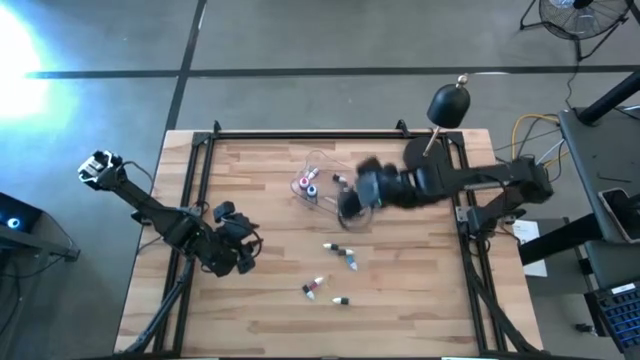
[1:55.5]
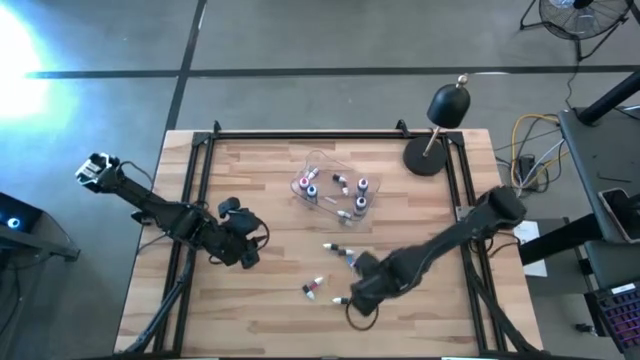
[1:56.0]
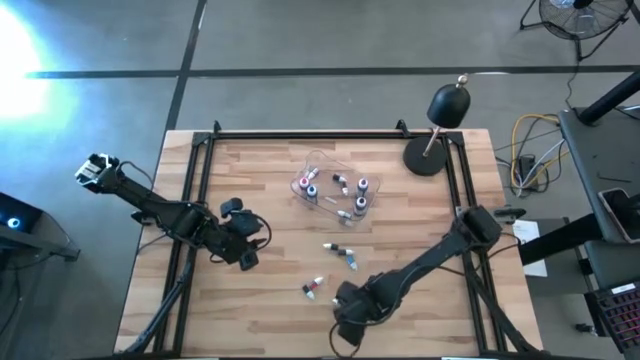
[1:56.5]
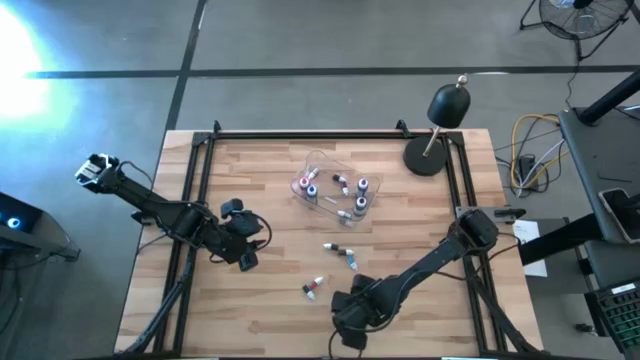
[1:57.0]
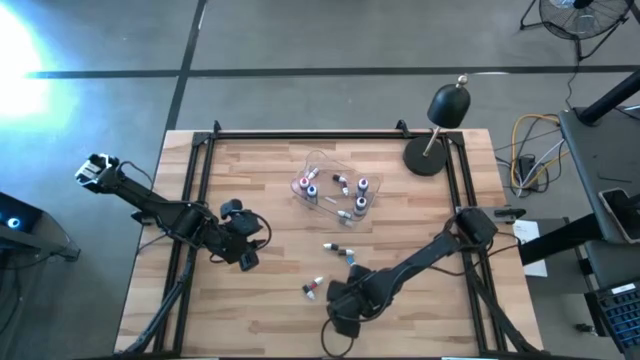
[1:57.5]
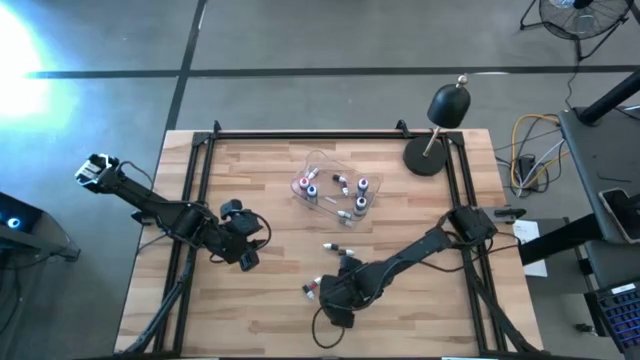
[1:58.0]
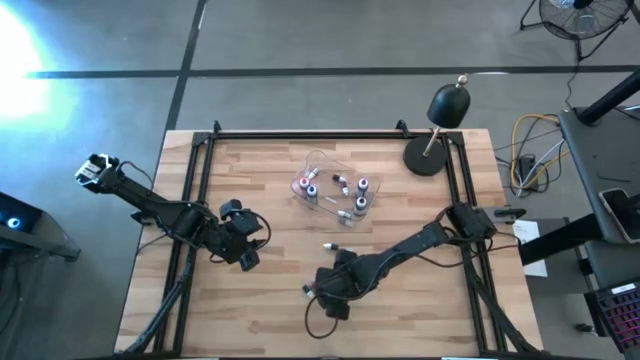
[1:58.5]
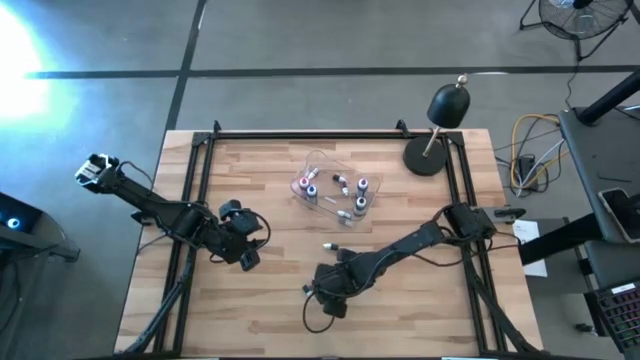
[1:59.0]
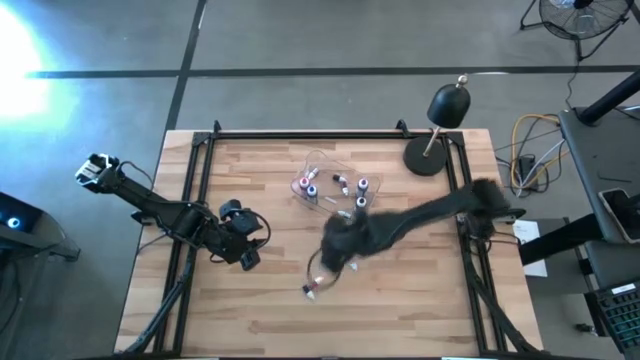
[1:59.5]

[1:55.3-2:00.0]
Task: Pick & Place food coloring
Put the bottom small black food coloring bottle into the transparent bin

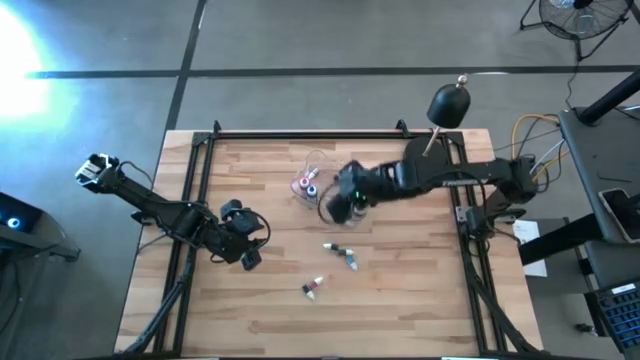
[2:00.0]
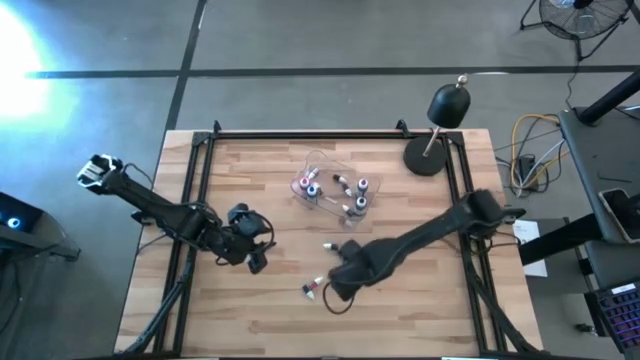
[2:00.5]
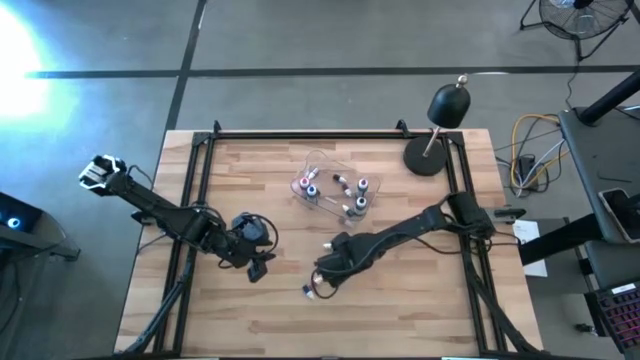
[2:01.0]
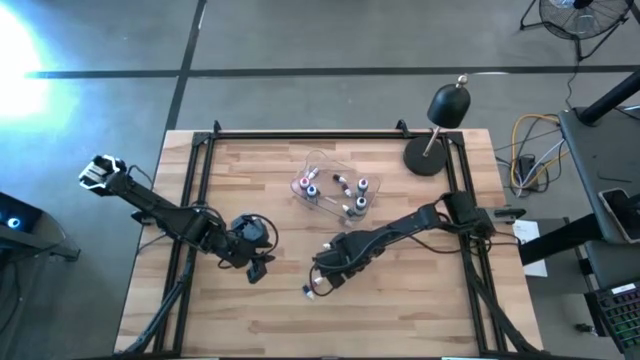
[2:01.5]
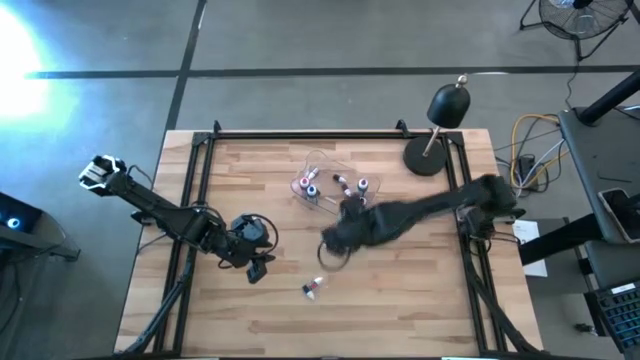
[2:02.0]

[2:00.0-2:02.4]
Put the small blue food coloring bottle into the transparent bin

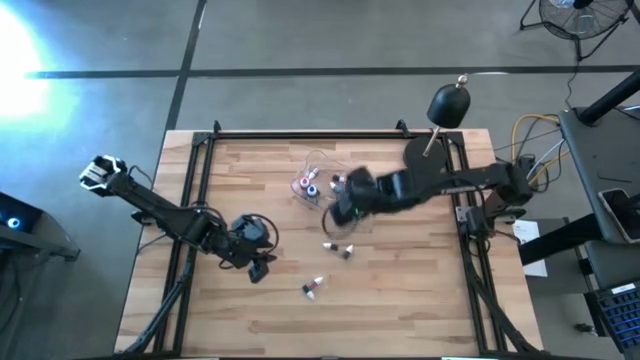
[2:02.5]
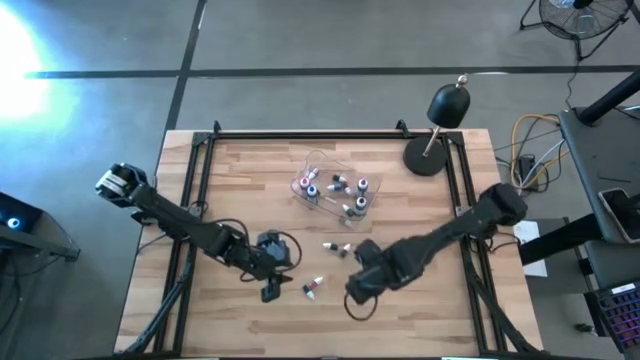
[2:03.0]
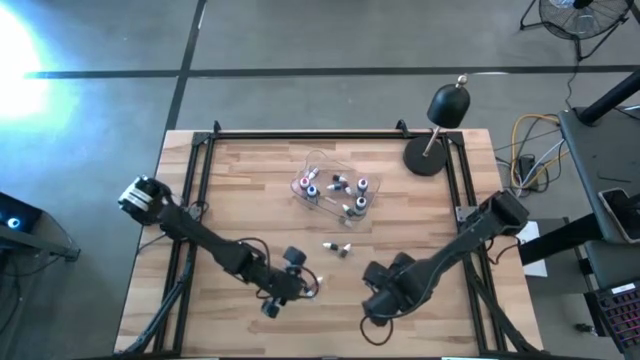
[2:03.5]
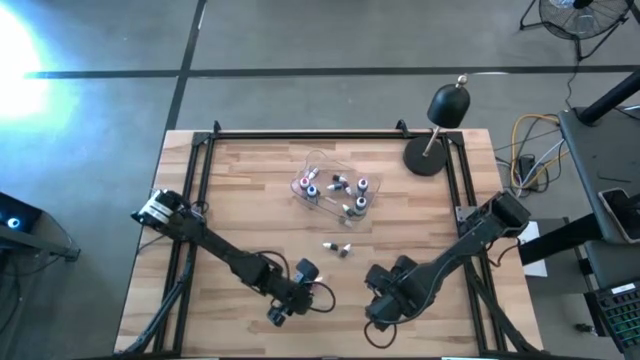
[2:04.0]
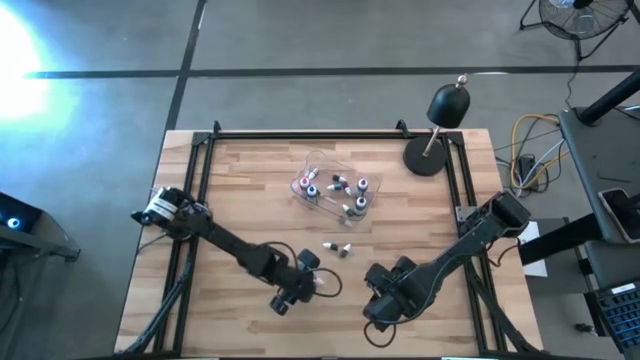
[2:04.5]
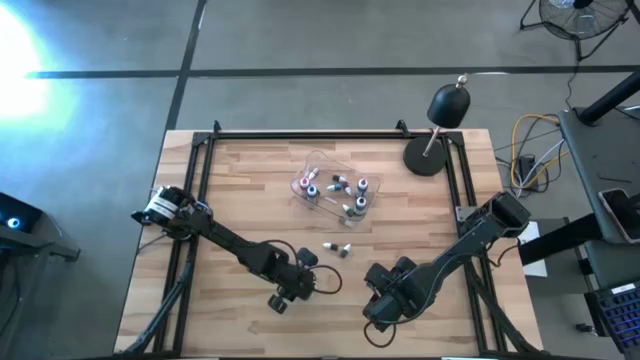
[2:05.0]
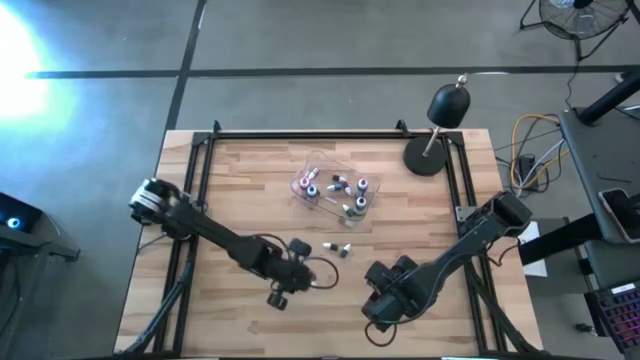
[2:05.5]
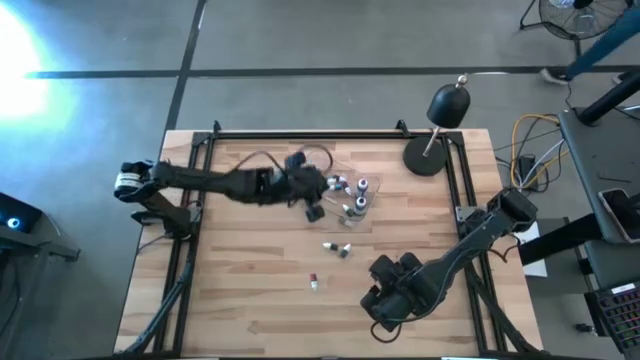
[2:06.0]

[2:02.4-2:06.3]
Put the small purple food coloring bottle into the transparent bin

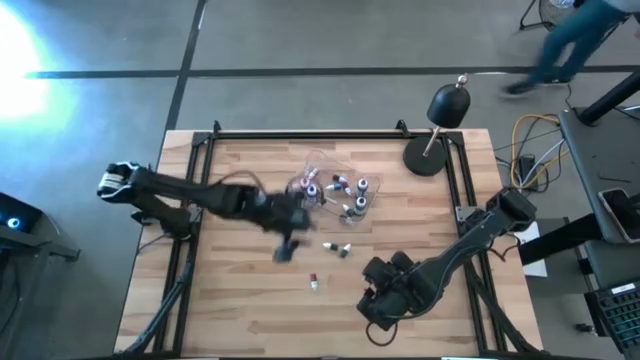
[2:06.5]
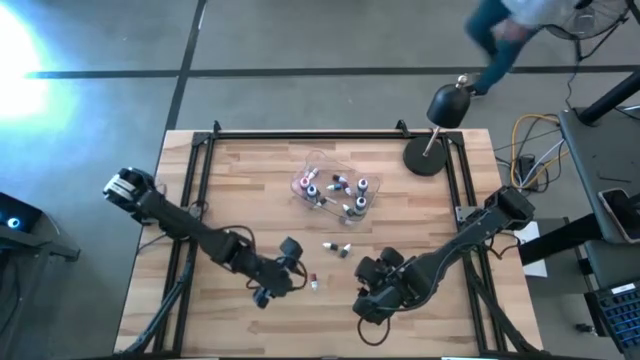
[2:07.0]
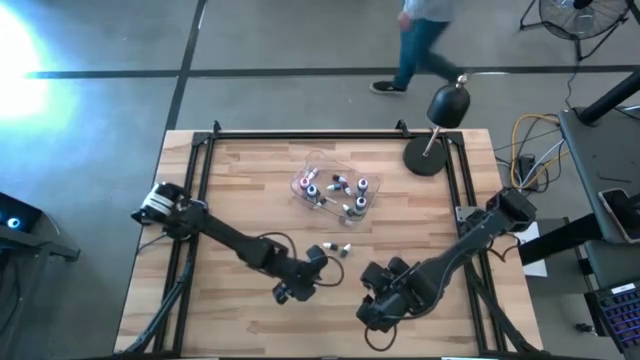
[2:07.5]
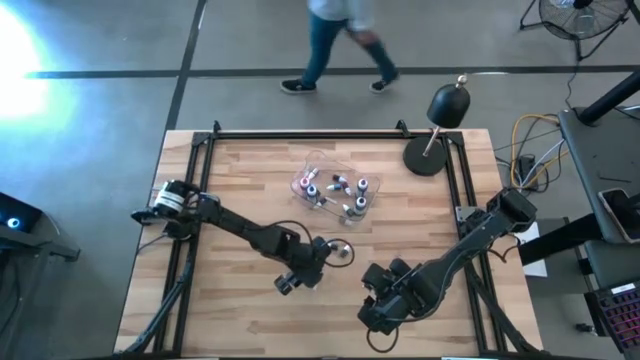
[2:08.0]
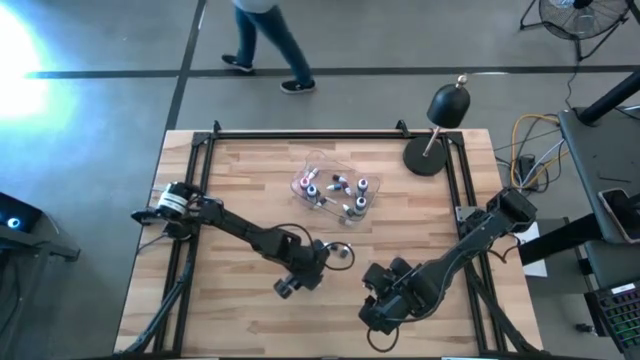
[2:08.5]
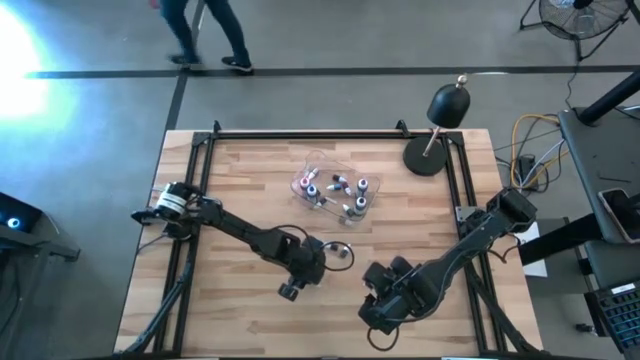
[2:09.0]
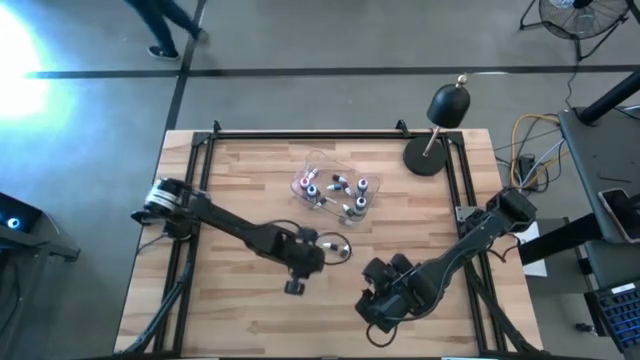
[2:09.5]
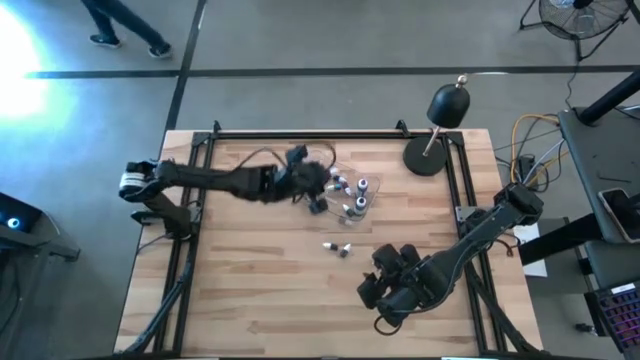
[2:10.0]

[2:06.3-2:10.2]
Put the small red food coloring bottle into the transparent bin

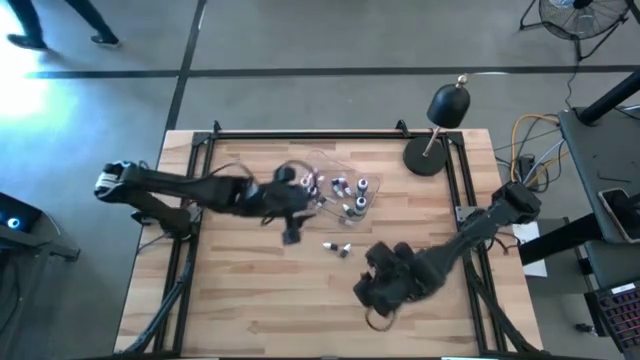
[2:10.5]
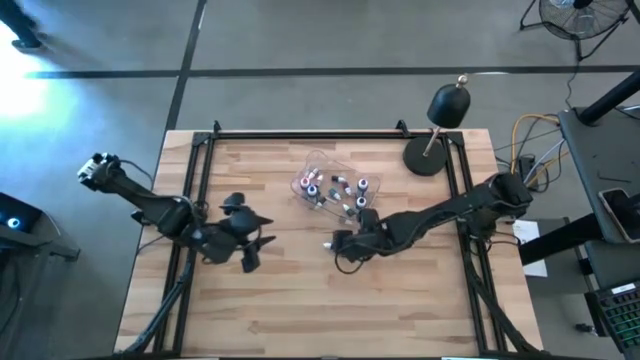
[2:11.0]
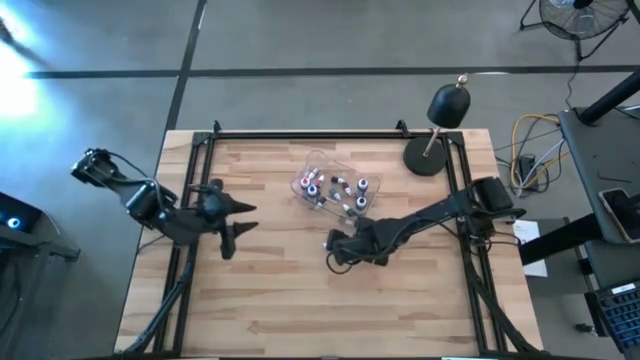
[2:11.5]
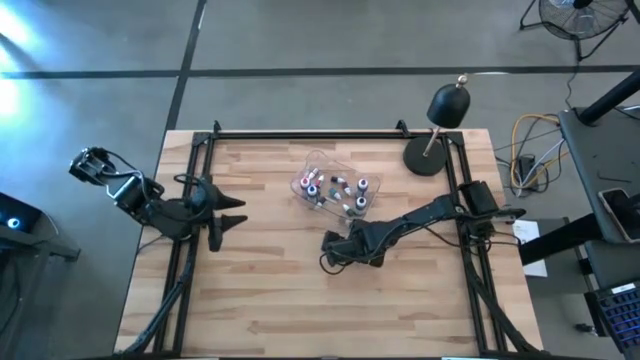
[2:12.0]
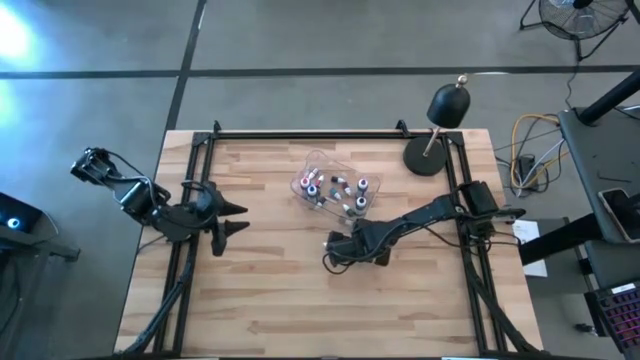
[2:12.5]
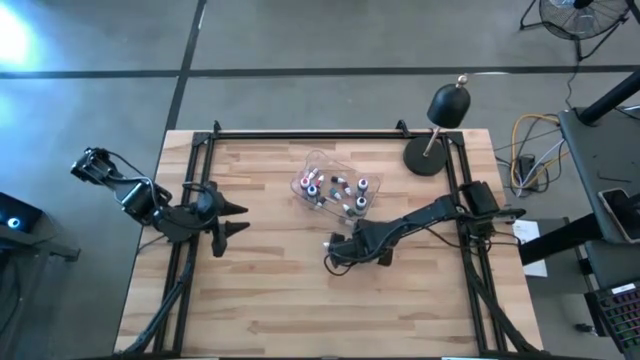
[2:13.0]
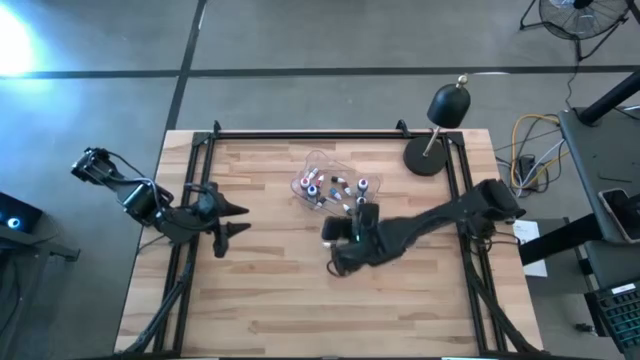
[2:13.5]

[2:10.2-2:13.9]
Put the right small black food coloring bottle into the transparent bin

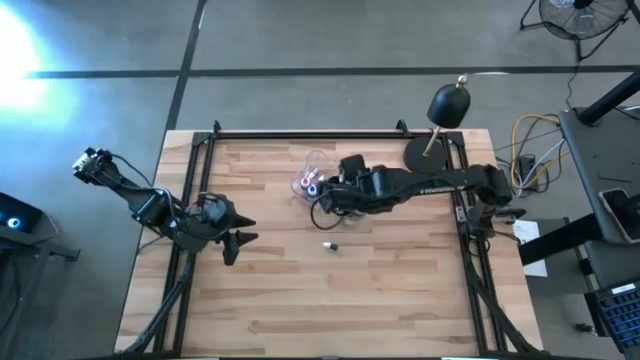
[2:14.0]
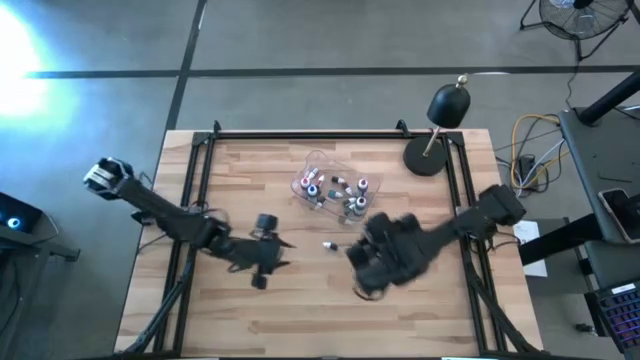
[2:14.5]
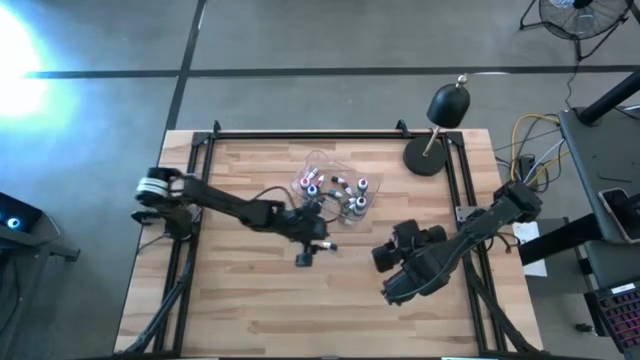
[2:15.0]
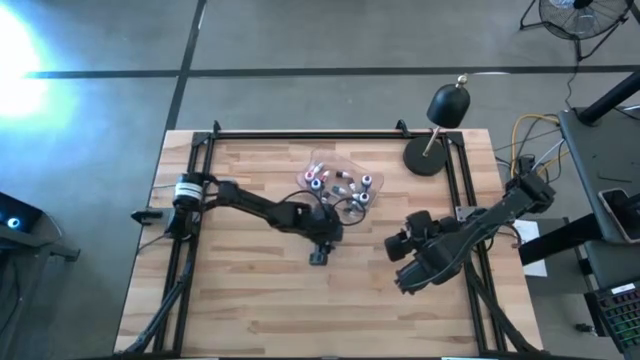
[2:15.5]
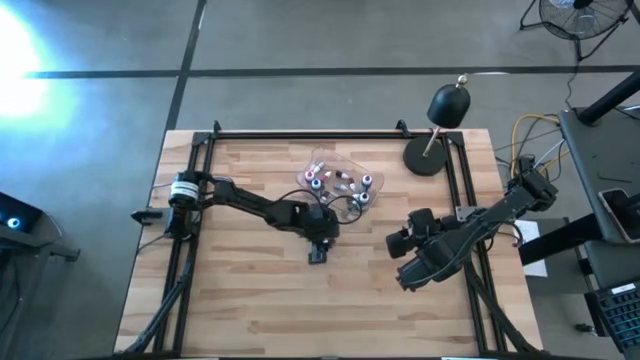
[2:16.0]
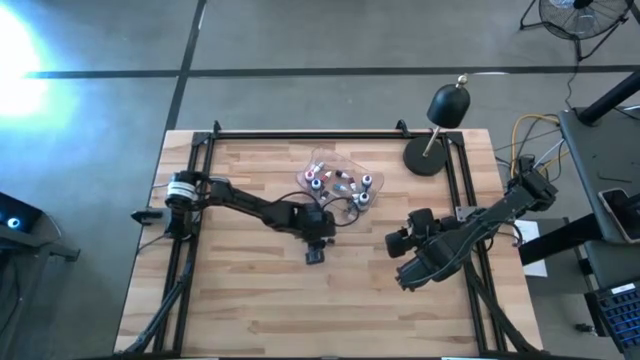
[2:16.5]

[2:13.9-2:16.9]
Put the small black food coloring bottle into the transparent bin
